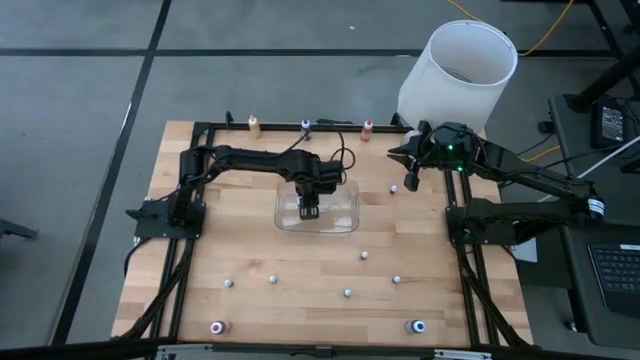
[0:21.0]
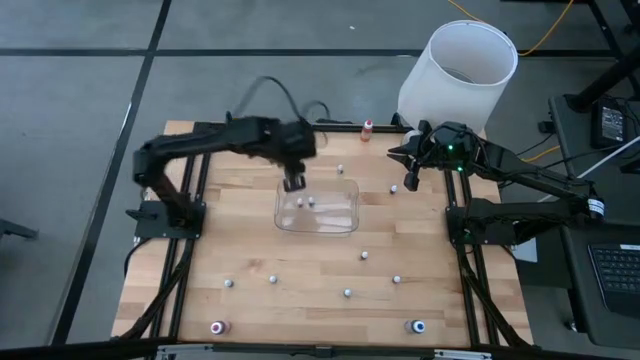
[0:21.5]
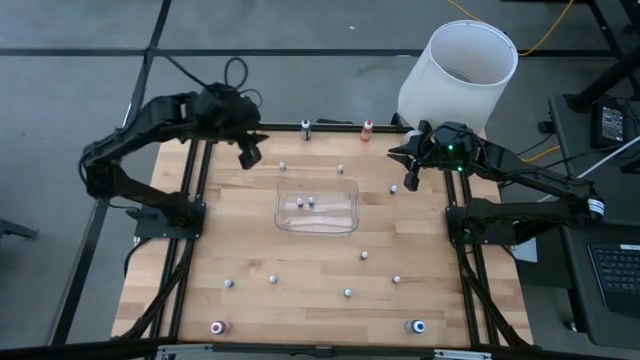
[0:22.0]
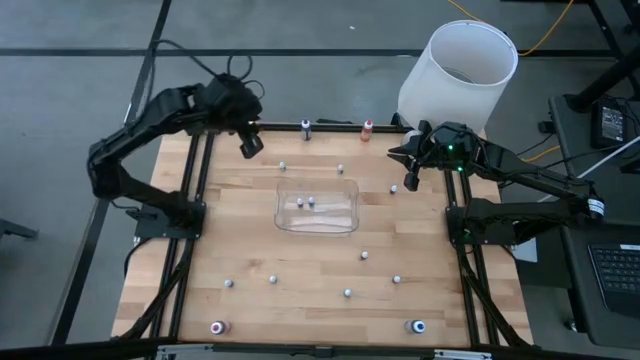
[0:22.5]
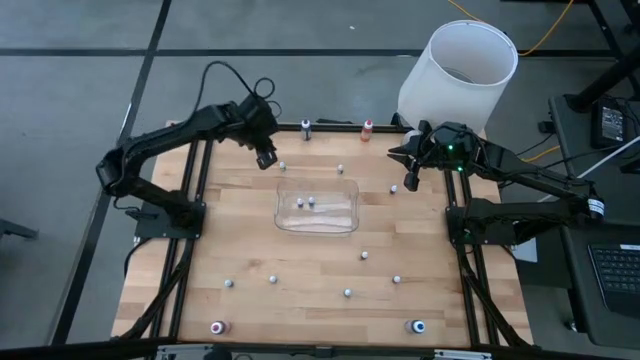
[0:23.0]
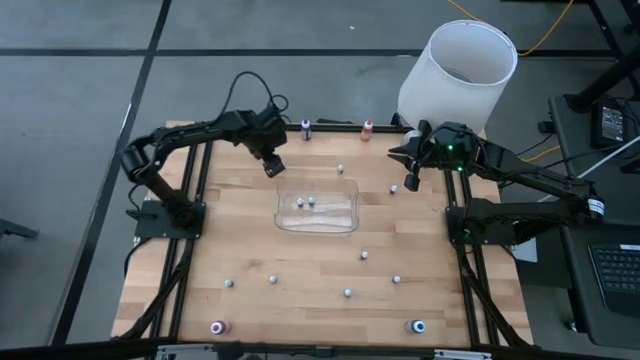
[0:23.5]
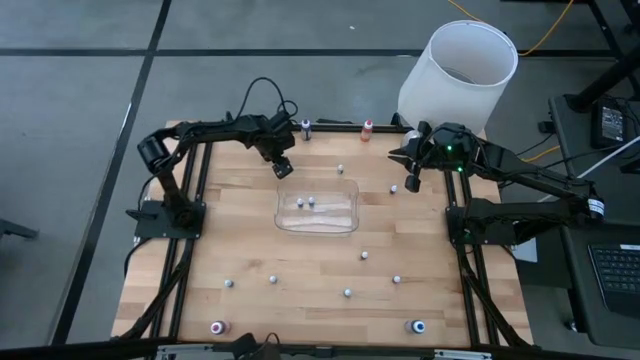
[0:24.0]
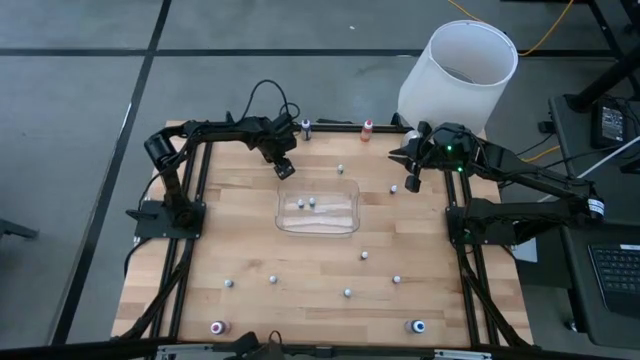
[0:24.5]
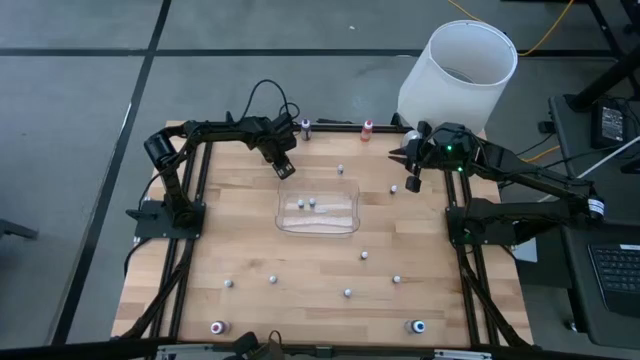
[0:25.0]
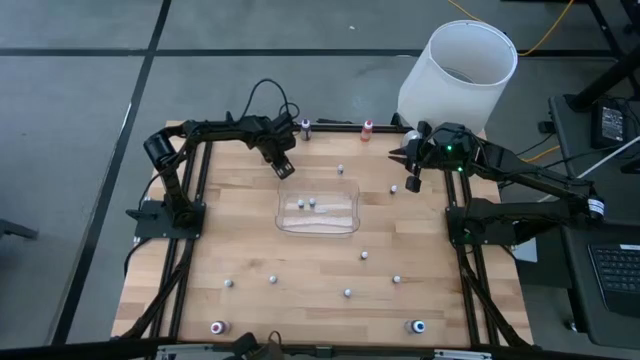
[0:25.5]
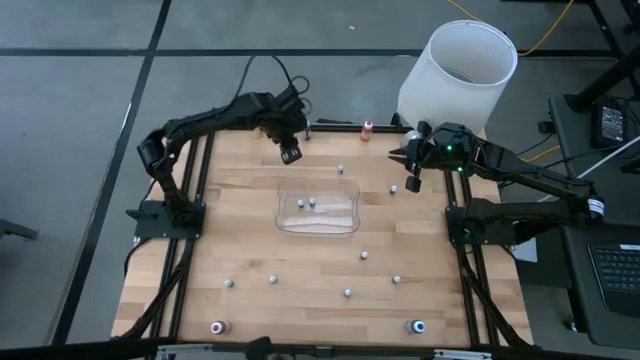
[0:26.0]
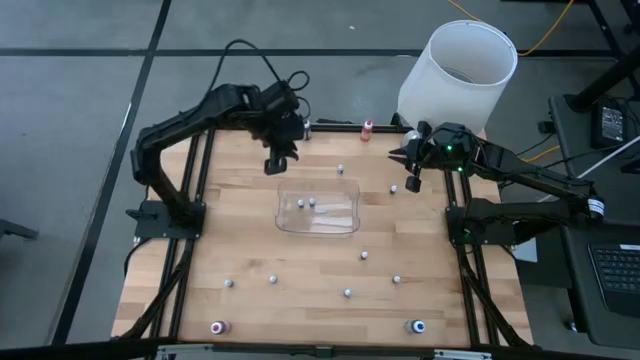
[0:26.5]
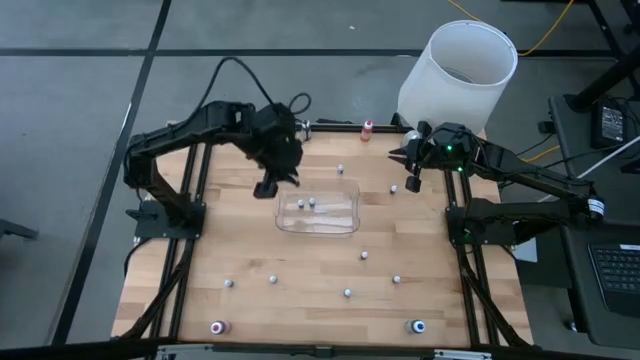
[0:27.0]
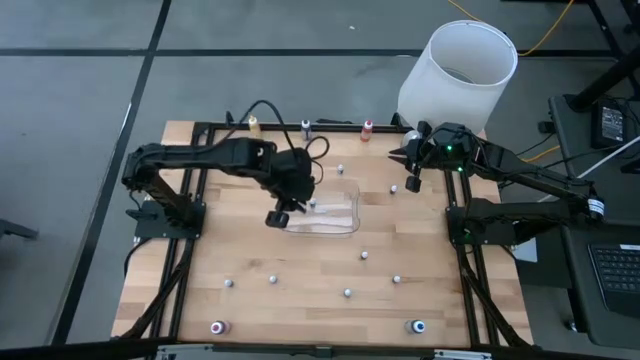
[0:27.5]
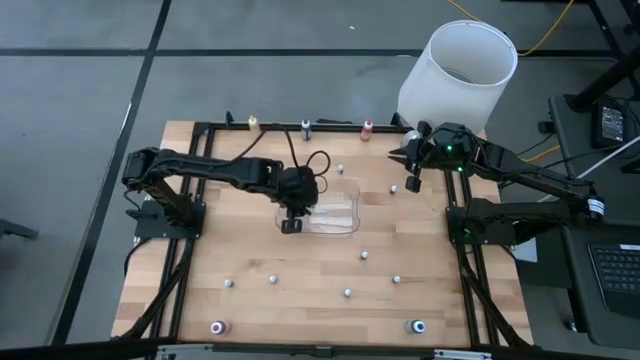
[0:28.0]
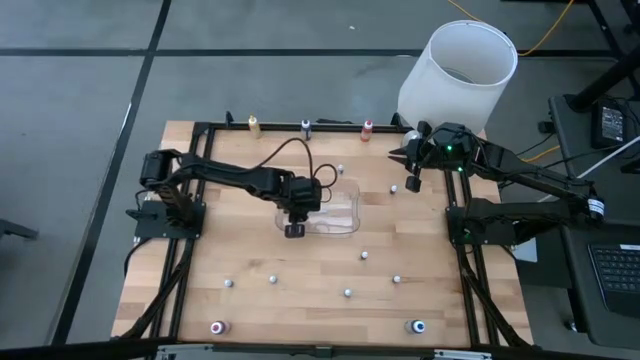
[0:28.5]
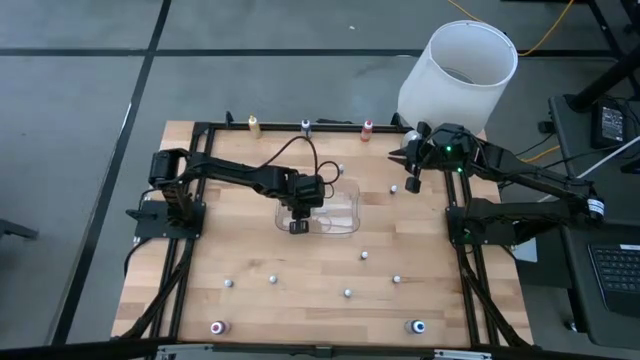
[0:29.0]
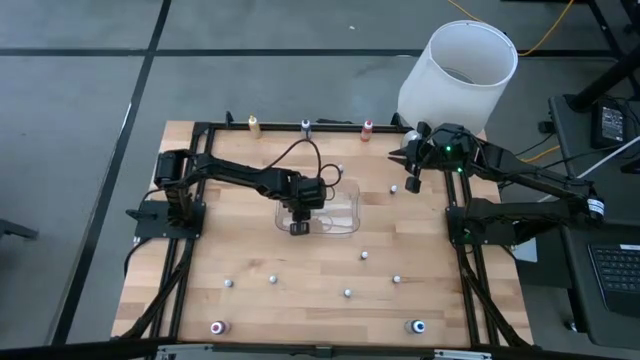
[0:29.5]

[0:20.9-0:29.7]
Task: Pick & Place food coloring
Put the green food coloring bottle into the transparent bin

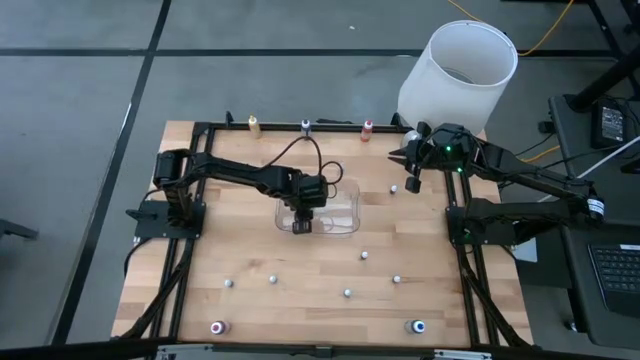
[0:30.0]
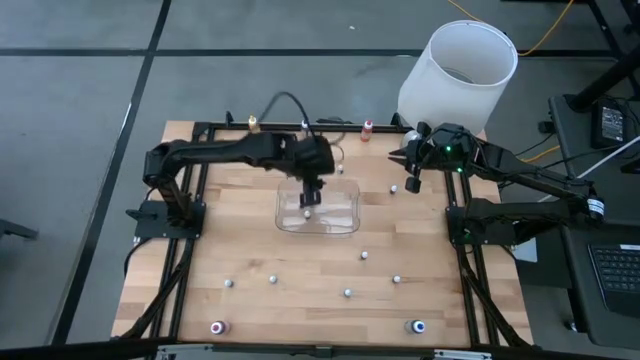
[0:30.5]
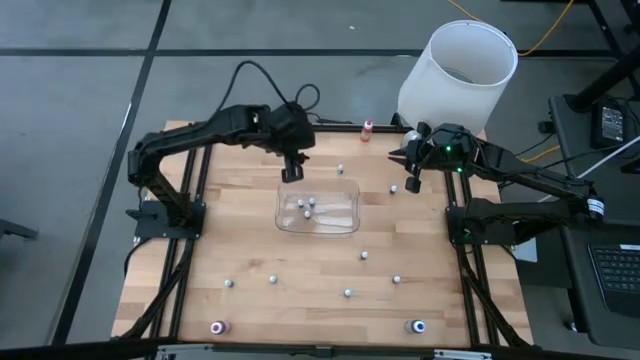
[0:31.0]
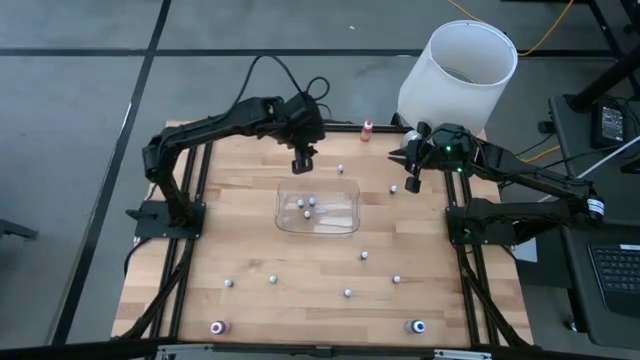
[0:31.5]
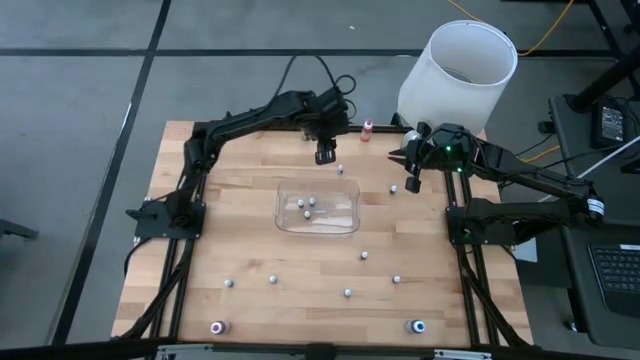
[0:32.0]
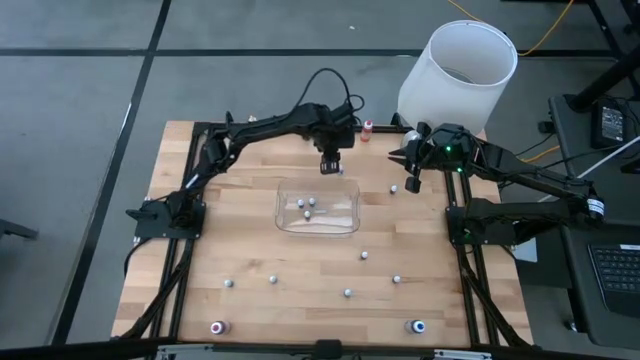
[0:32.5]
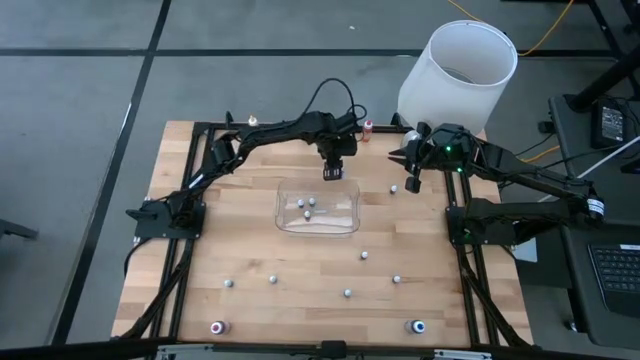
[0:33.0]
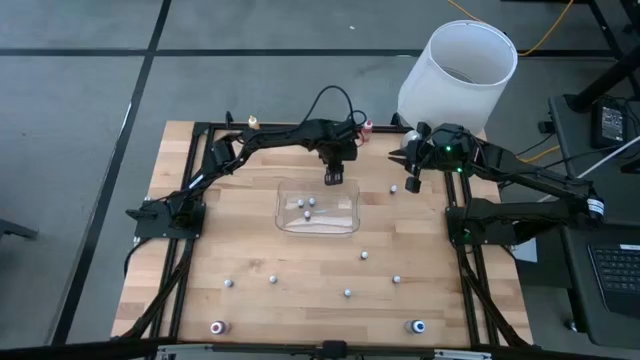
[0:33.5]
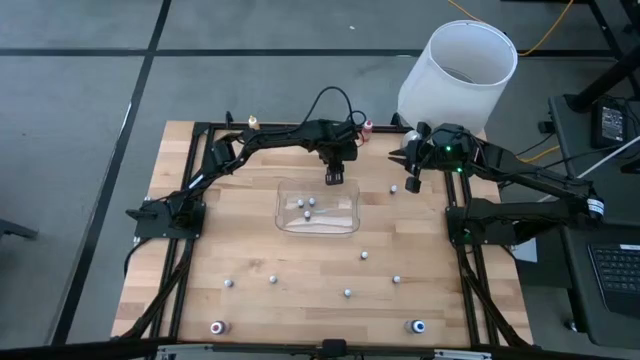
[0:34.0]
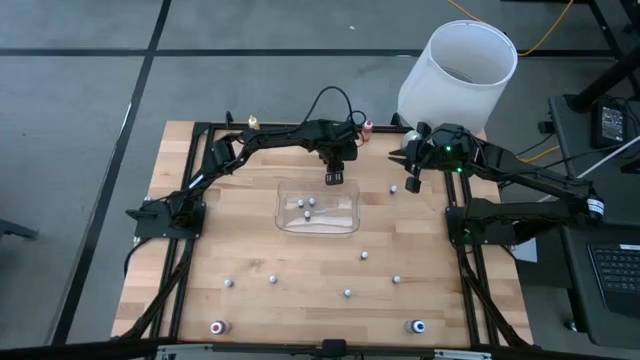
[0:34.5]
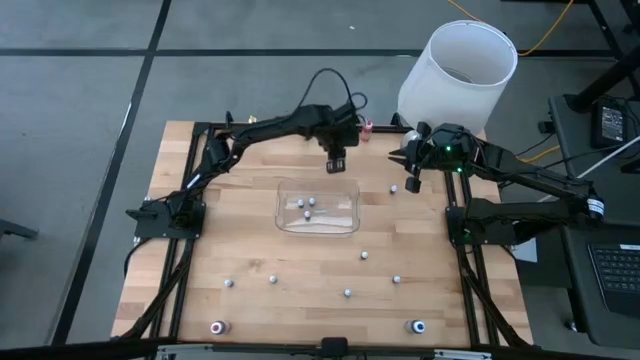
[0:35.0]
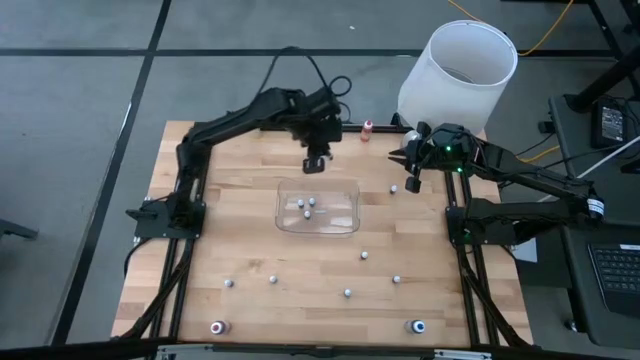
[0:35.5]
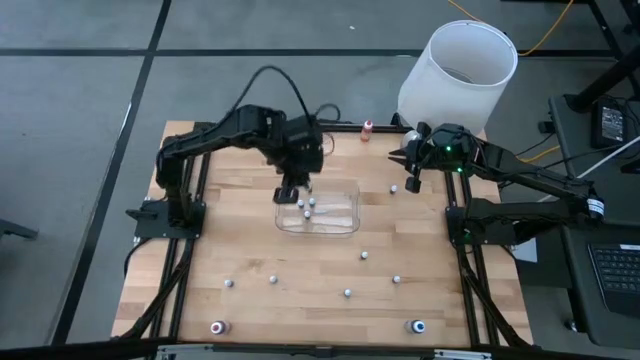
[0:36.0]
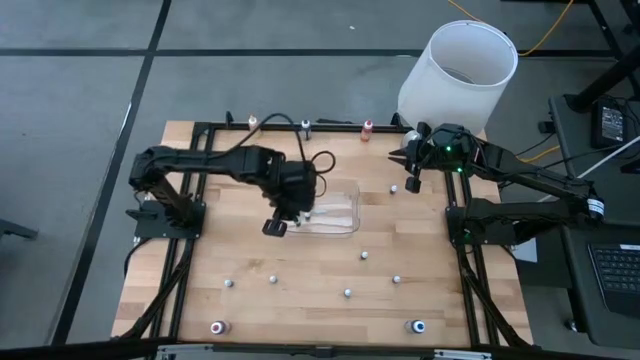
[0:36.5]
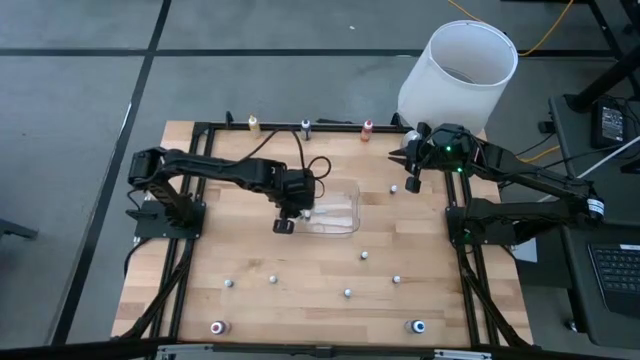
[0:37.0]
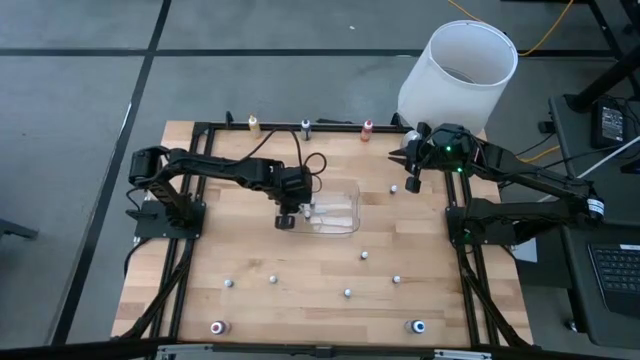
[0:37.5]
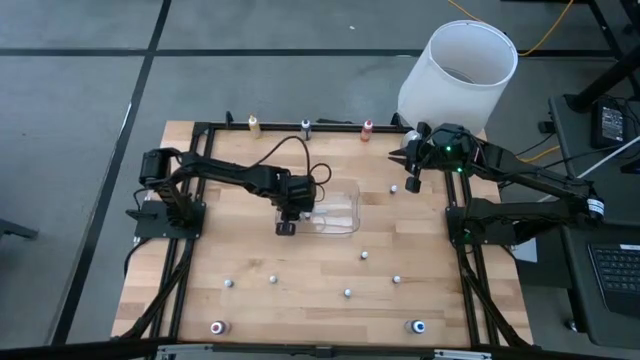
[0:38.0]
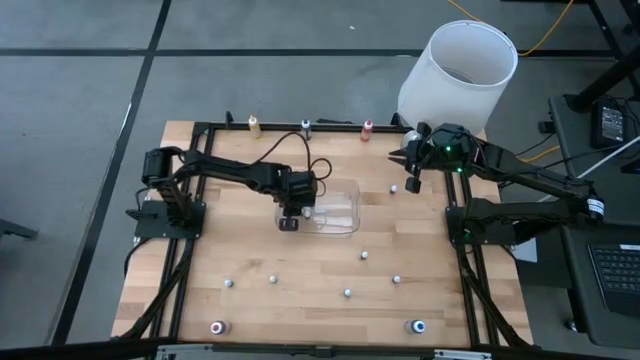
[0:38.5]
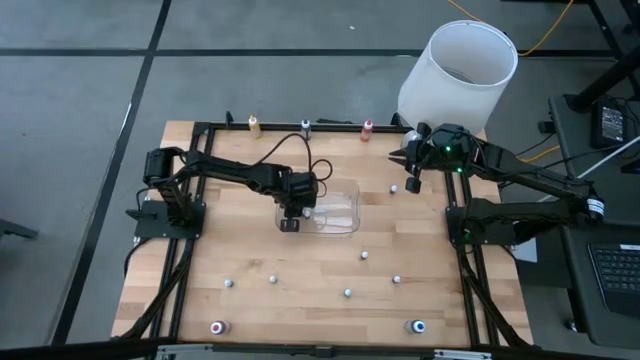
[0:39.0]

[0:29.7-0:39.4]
Put the violet food coloring bottle into the transparent bin

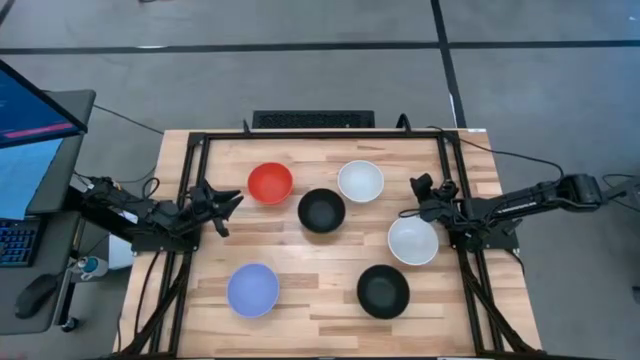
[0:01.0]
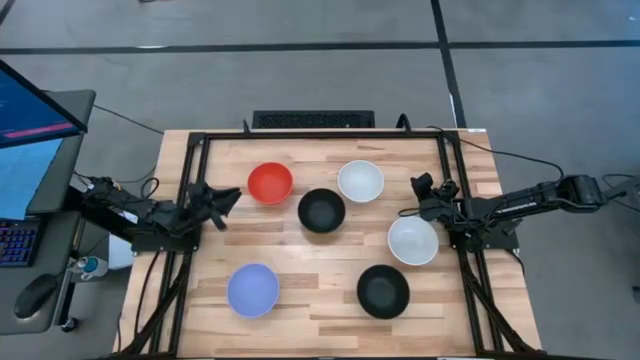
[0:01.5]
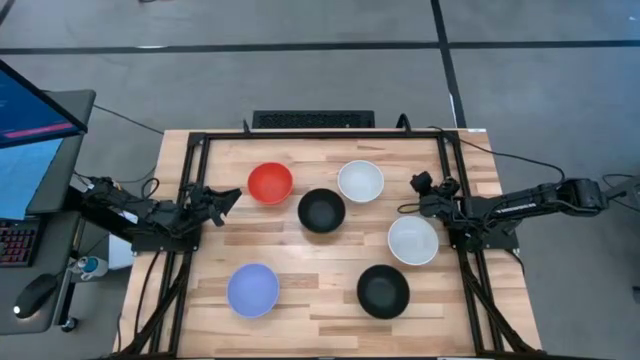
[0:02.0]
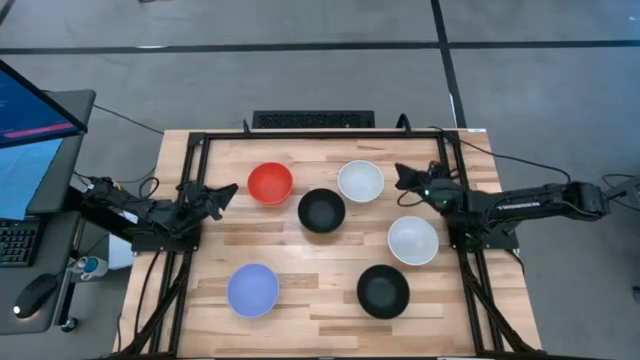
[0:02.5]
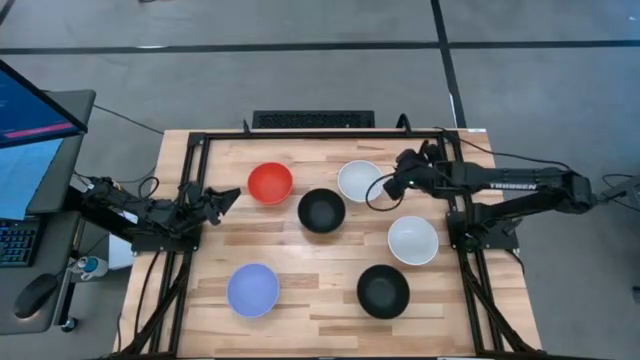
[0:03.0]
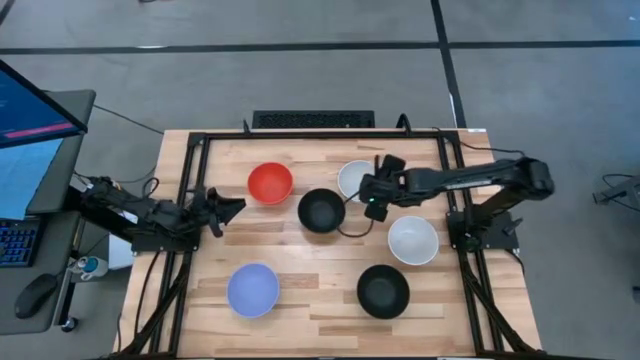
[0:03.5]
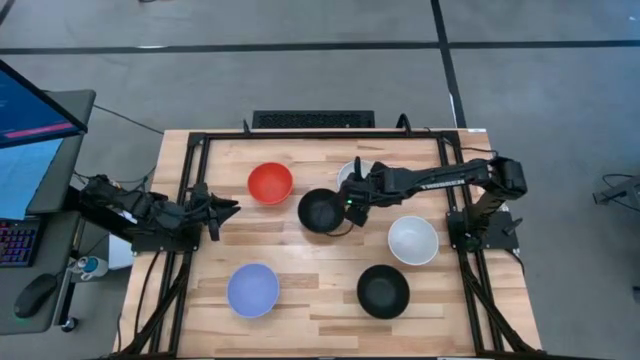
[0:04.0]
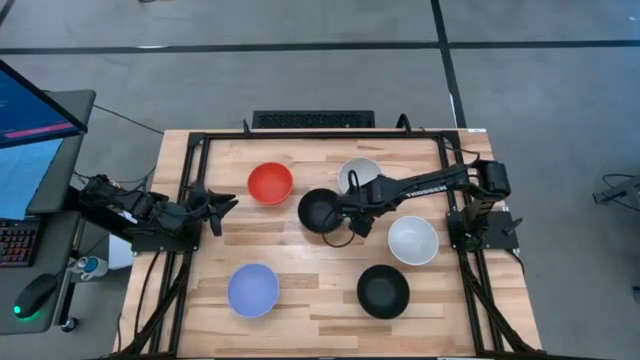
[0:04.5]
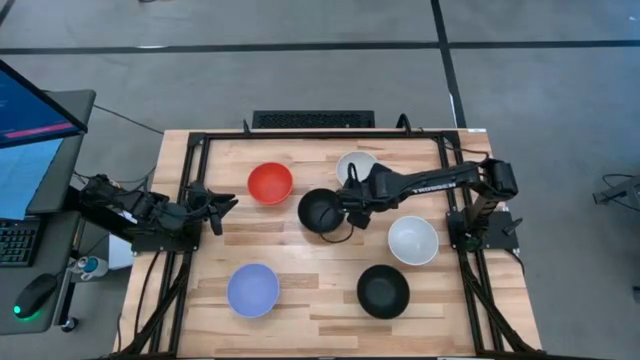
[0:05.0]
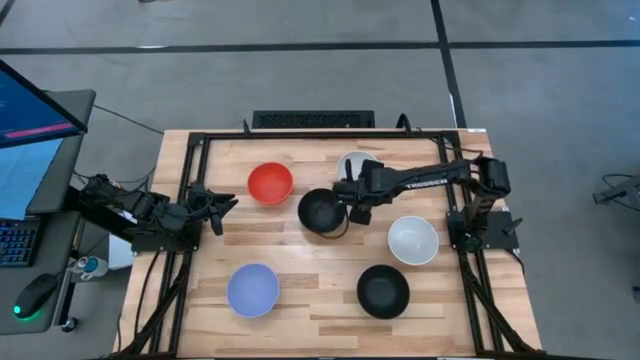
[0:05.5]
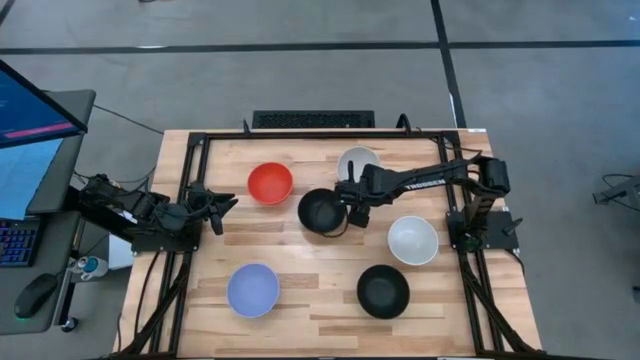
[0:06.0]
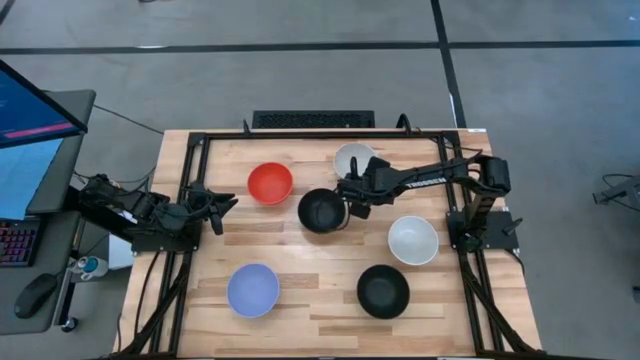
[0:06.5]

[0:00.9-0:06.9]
Task: Nest bowls inside each other
Stack the top white bowl on the top black bowl
